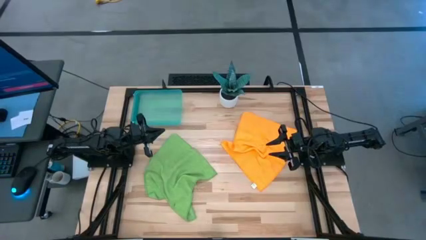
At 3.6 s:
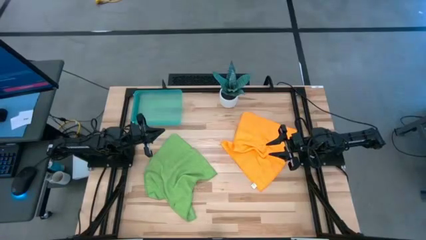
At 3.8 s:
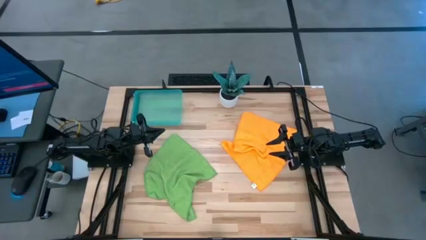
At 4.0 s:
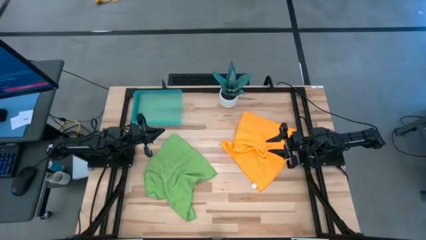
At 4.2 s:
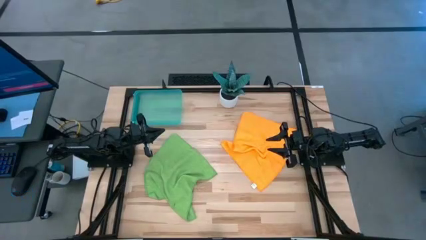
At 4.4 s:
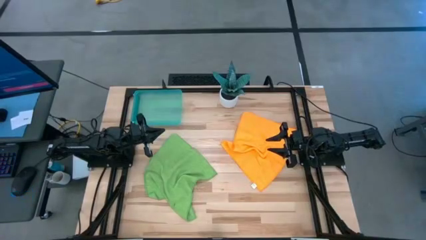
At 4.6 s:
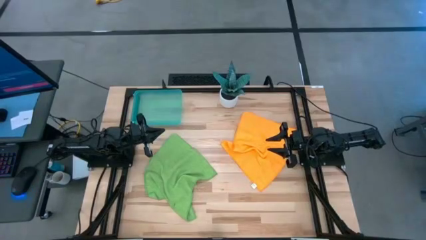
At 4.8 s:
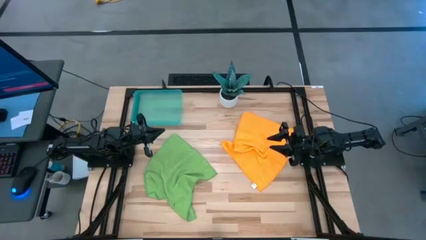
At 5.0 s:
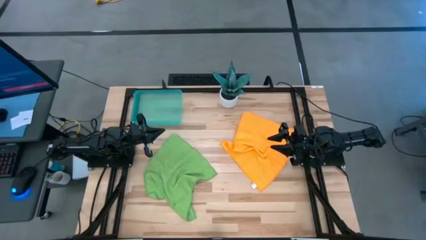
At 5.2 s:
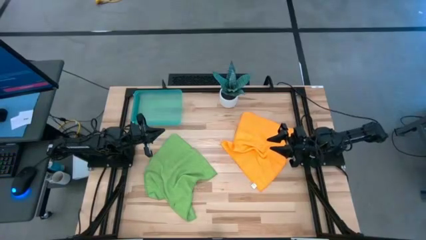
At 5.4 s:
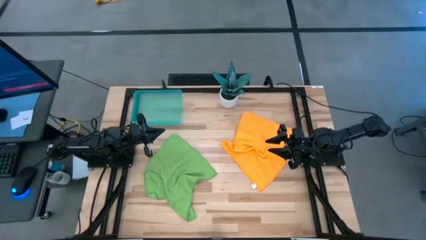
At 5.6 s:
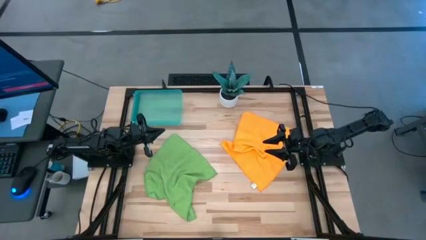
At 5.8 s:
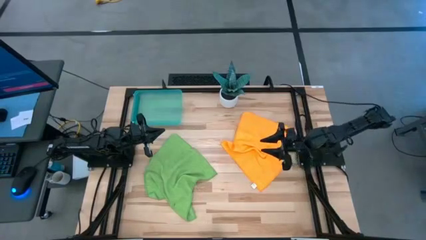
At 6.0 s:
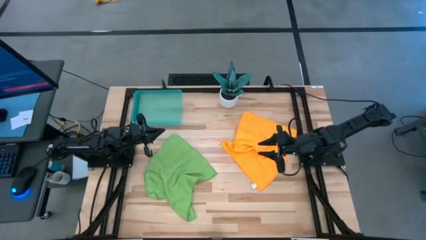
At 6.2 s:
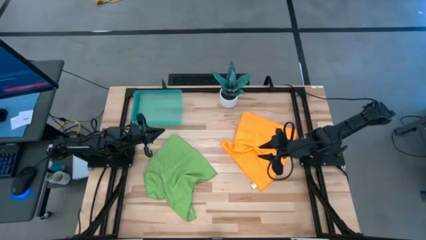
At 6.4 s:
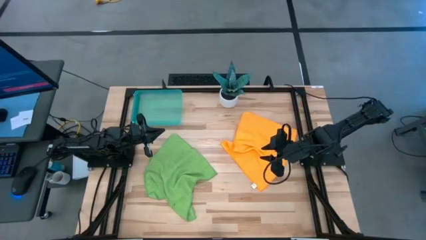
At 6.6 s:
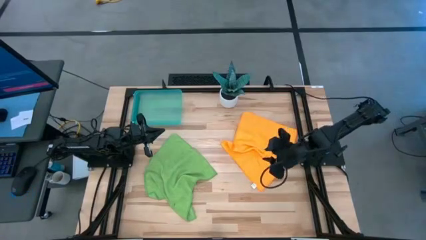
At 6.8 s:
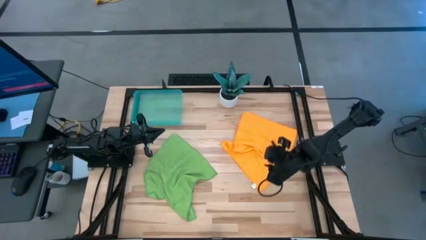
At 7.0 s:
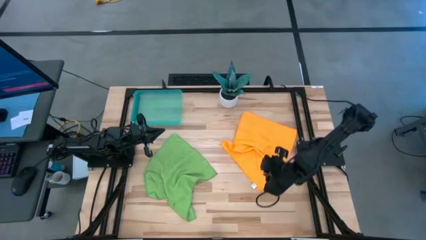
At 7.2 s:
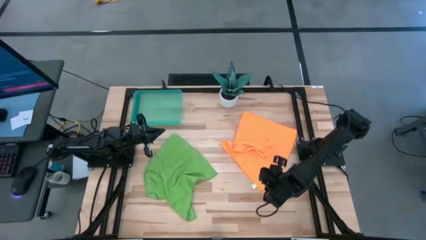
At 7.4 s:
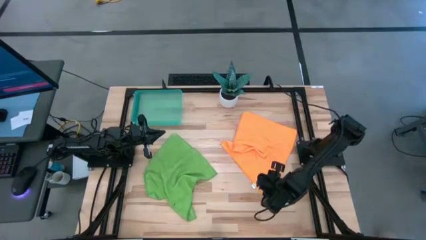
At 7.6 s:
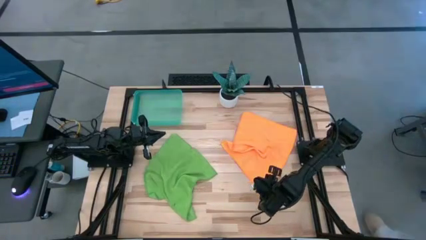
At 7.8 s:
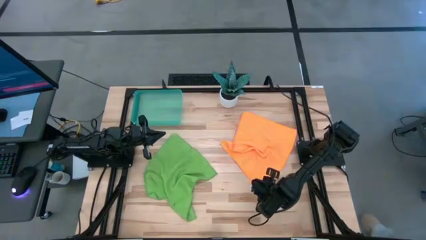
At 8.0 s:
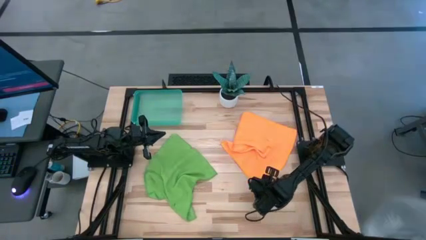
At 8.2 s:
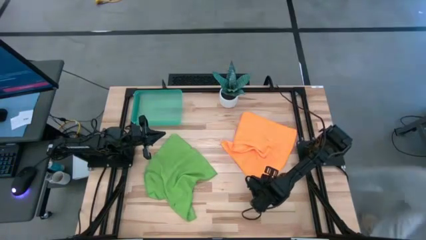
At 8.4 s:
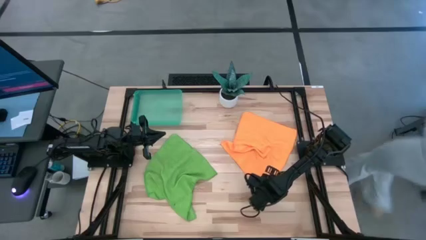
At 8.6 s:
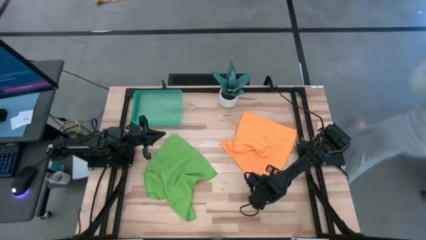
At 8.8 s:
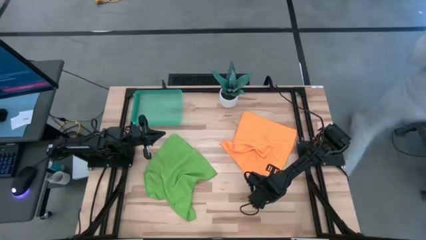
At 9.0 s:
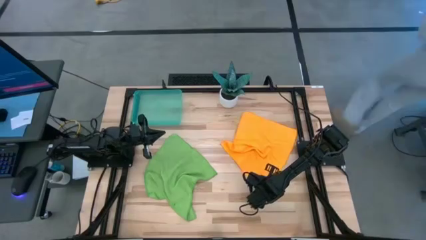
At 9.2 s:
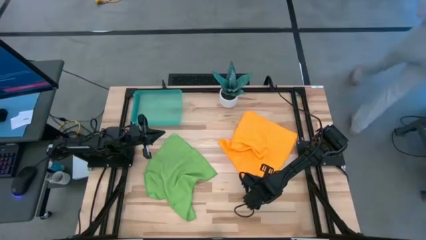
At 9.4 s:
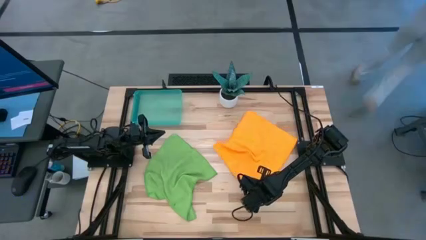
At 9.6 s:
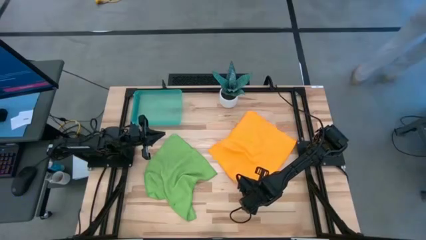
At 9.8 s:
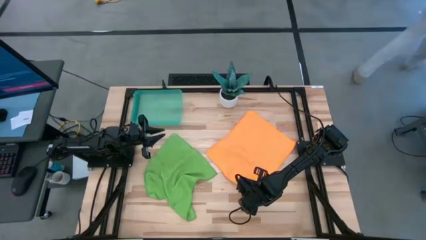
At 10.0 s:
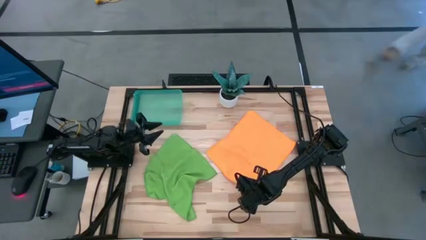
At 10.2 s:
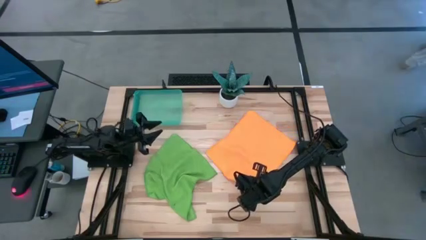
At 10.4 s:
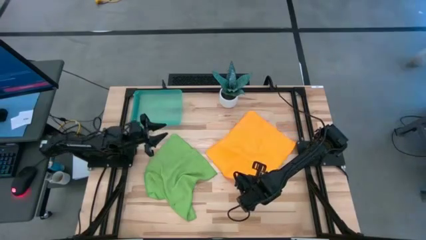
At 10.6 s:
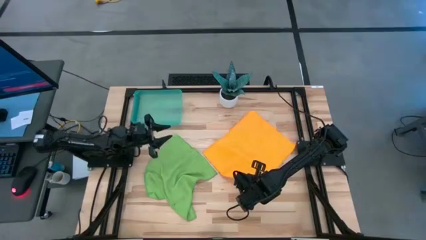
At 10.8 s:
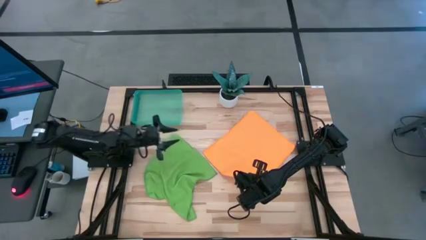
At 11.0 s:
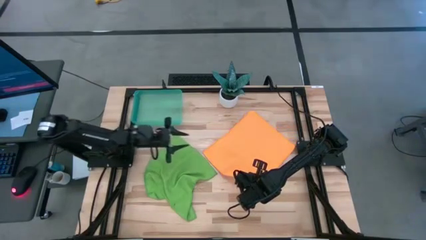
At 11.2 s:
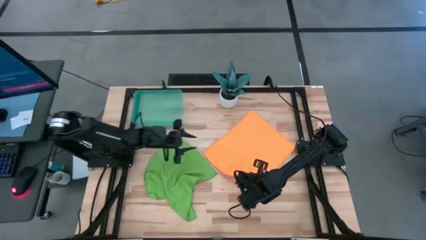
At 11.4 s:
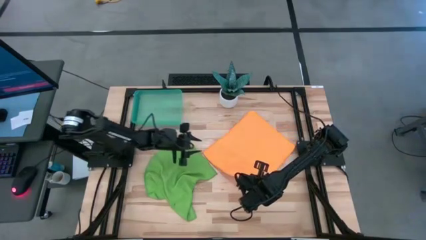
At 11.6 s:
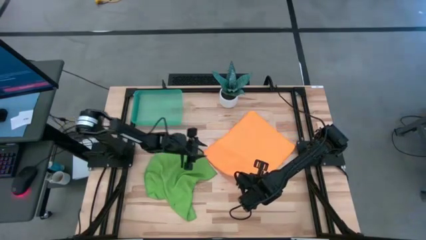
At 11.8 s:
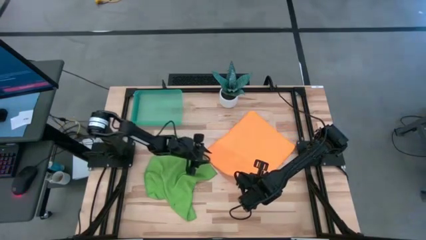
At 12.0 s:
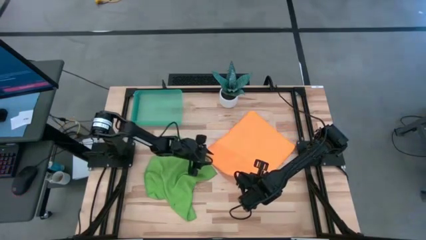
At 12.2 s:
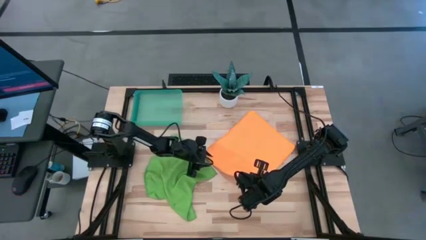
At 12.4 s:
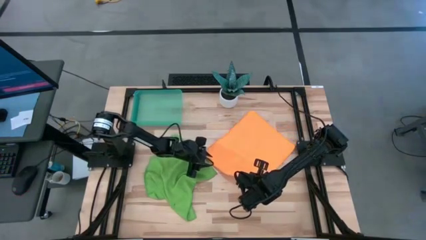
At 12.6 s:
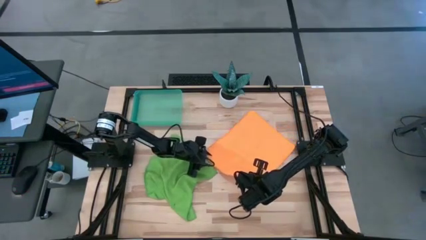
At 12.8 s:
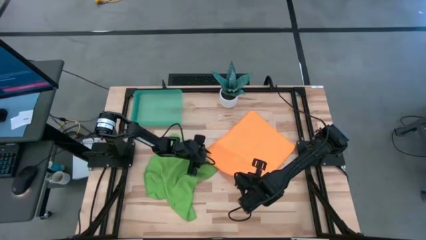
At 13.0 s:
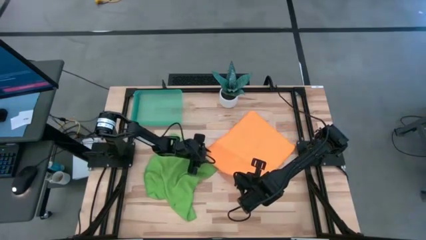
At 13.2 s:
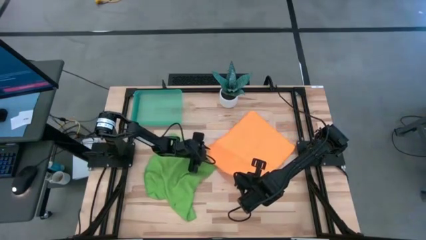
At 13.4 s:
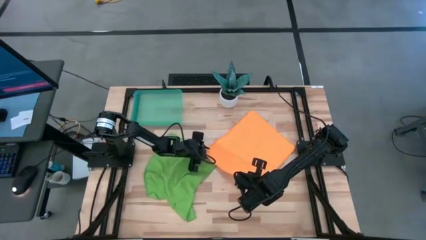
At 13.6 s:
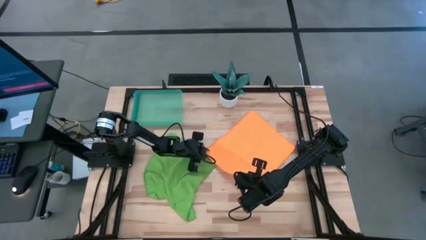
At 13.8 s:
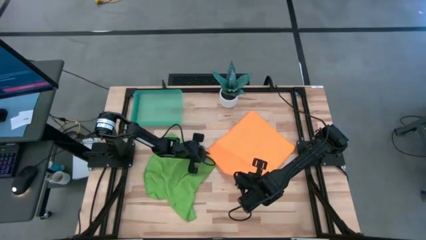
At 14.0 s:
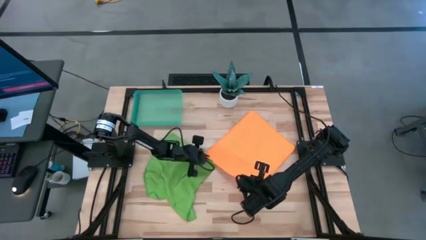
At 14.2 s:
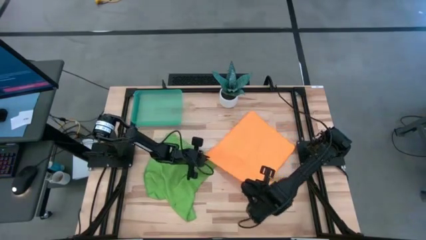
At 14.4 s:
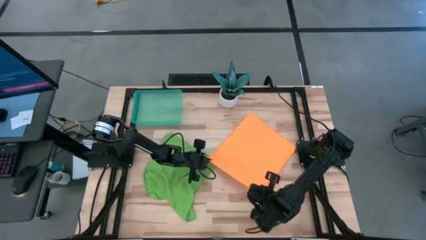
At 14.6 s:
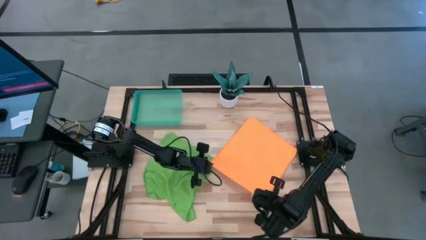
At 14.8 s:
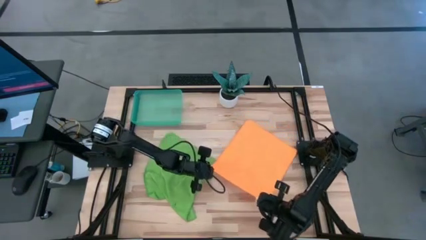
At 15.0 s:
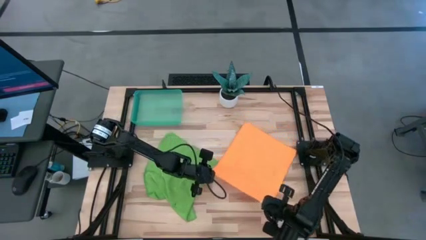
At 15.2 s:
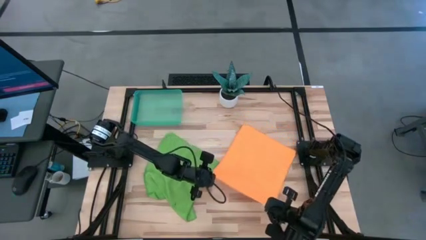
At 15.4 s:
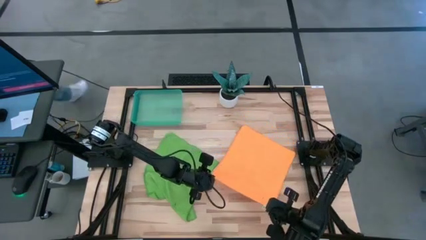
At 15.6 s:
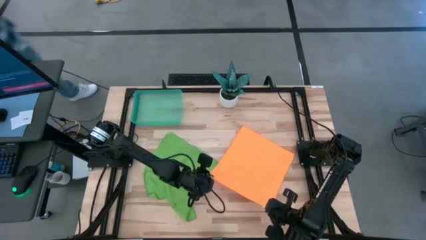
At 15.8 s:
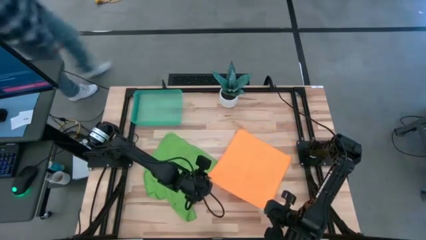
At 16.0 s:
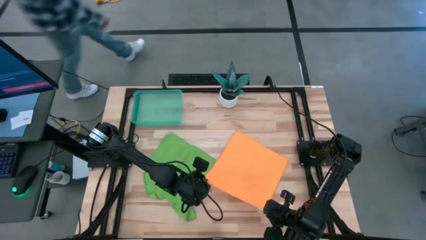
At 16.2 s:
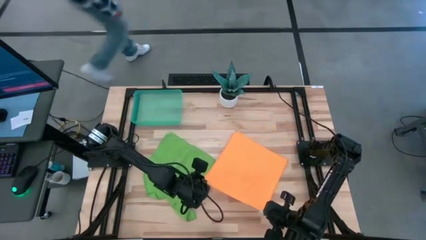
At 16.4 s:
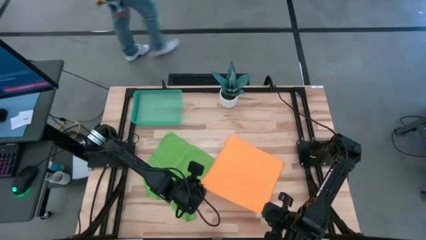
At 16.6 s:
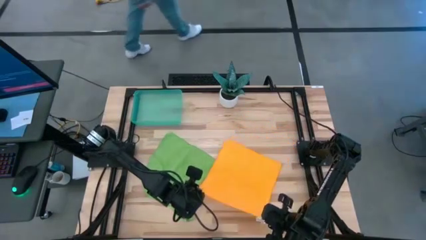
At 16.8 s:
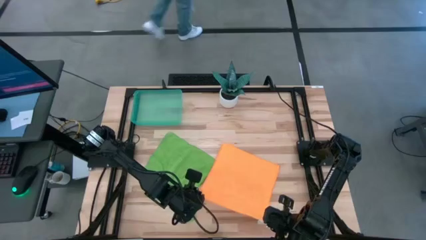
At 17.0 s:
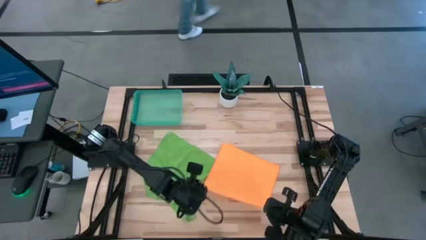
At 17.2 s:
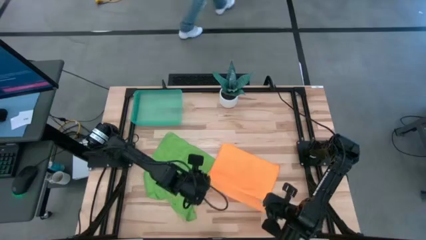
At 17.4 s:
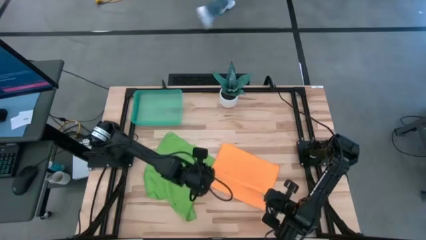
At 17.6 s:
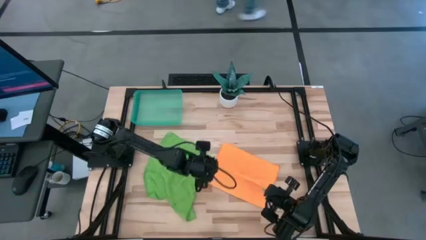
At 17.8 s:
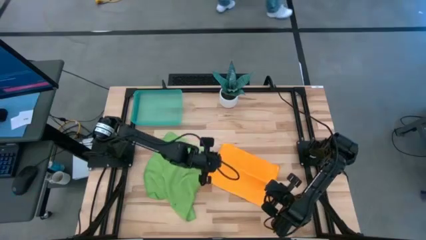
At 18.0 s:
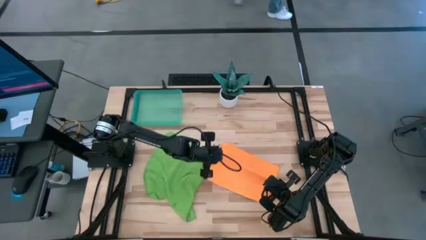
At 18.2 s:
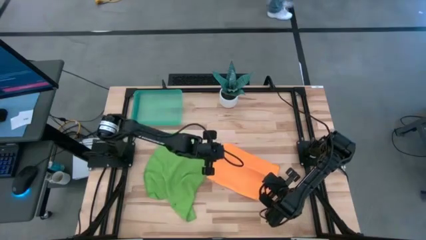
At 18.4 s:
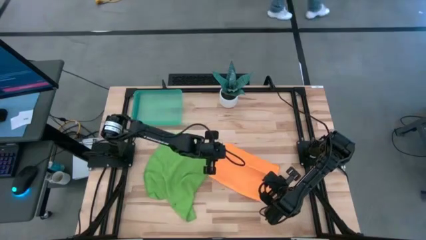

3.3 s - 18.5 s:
Task: Roll microfiber towels into tight, uniform cylinder then place into a basket
Fold the yellow microfiber cloth

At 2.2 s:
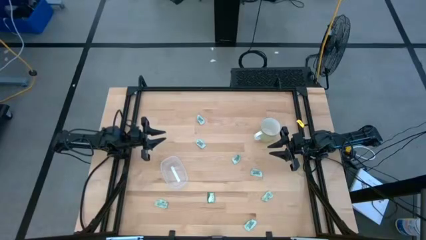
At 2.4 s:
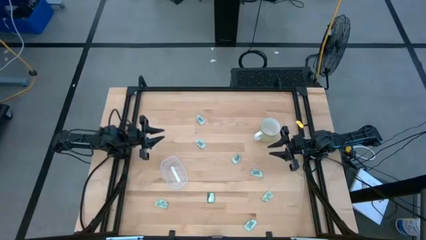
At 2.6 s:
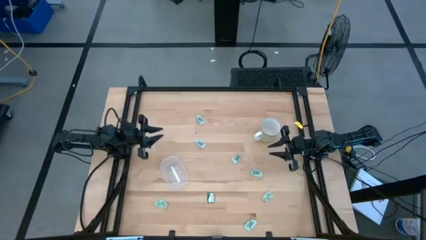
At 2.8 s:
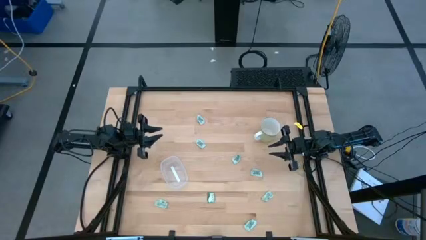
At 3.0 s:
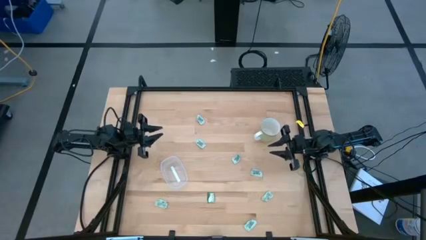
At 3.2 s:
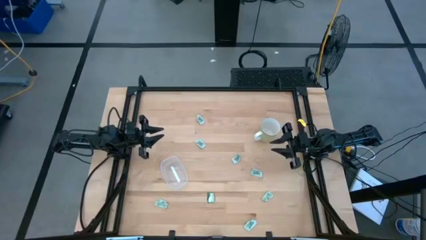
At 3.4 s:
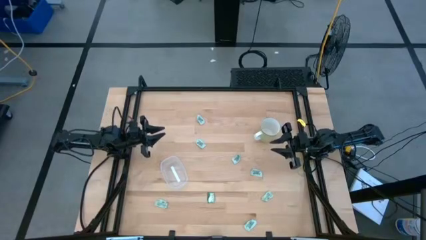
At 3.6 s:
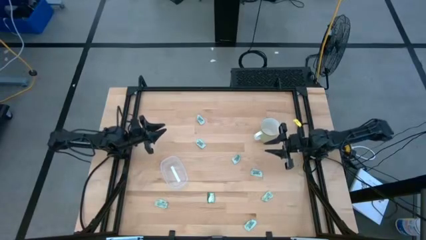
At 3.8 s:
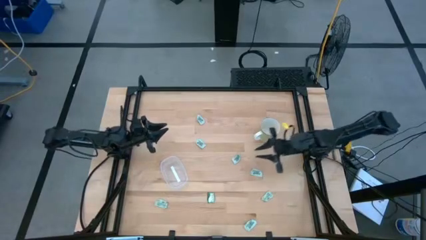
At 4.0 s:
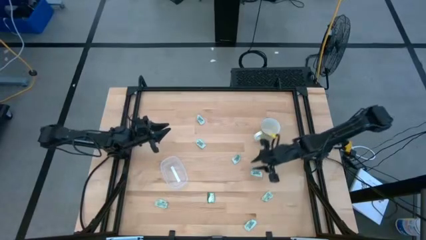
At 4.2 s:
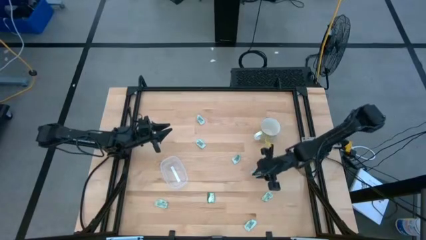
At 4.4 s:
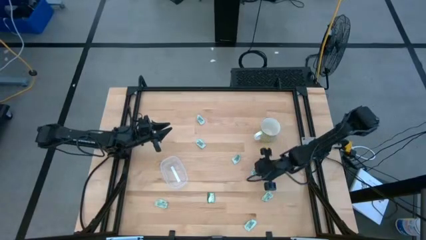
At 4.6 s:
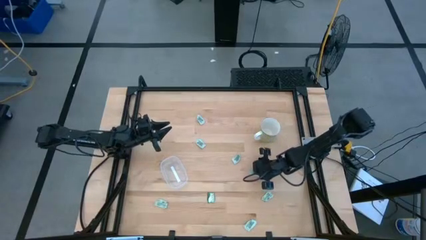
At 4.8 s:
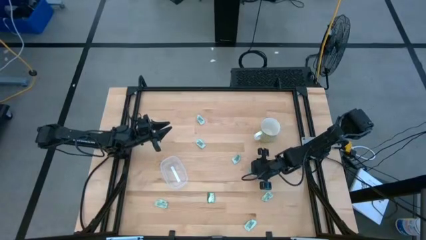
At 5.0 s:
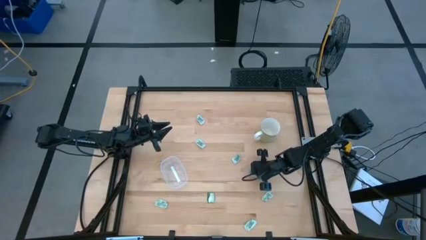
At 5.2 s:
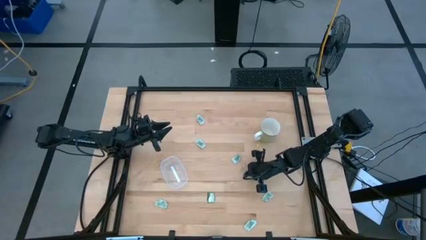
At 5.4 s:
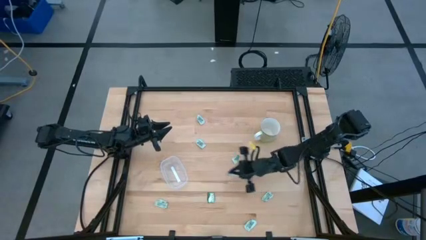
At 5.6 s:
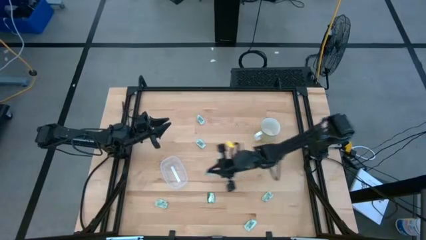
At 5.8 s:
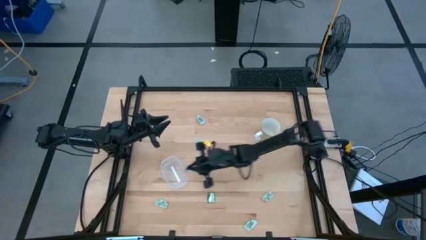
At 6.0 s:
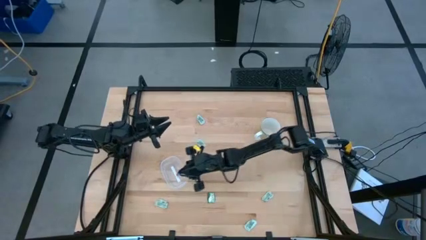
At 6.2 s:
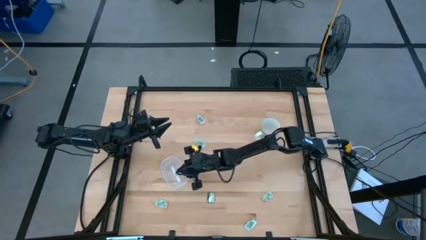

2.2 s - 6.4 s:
Task: Pick and place Stevia / Truvia into bins
Put the green stevia packet into the transparent bin
